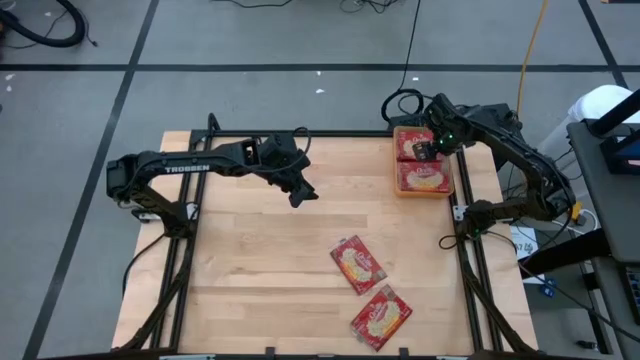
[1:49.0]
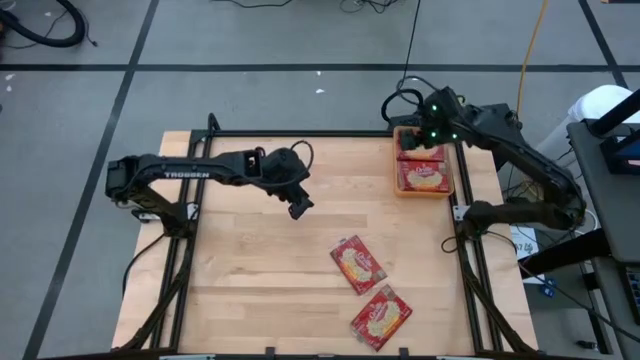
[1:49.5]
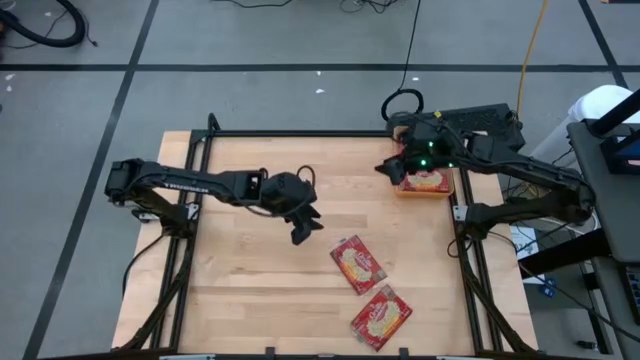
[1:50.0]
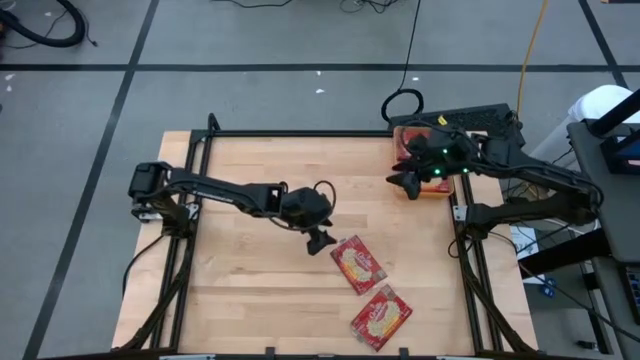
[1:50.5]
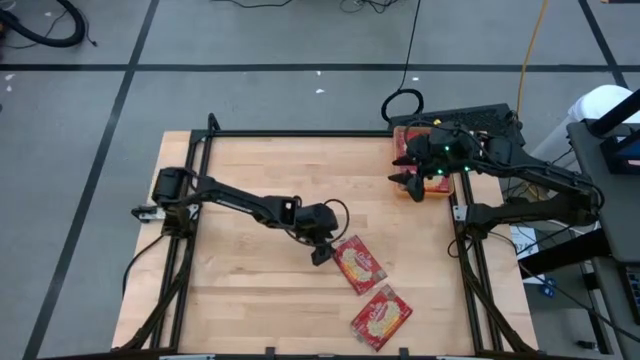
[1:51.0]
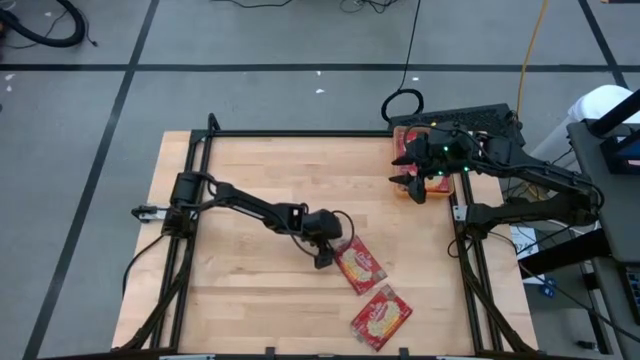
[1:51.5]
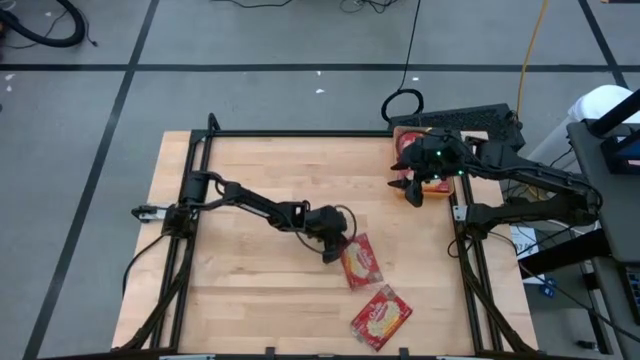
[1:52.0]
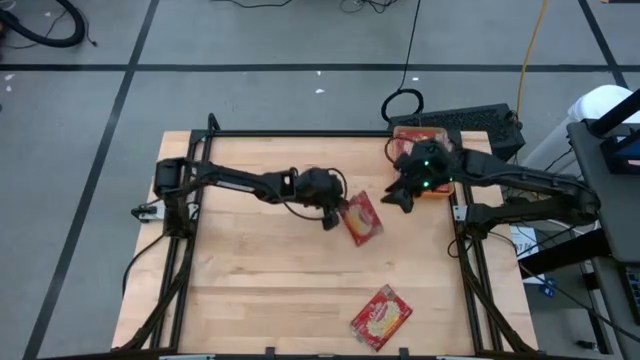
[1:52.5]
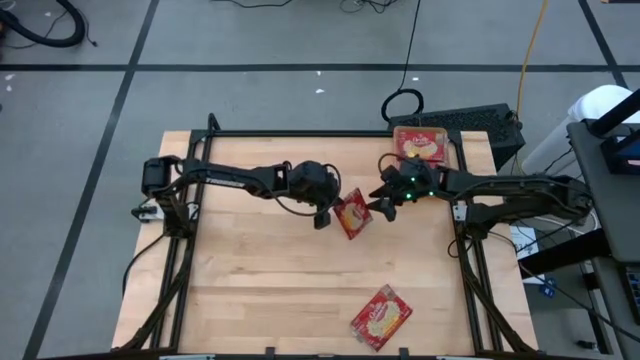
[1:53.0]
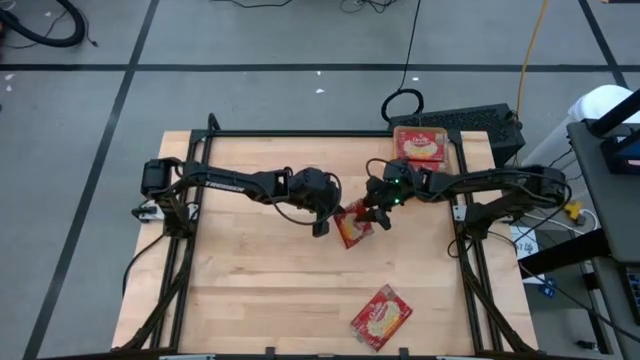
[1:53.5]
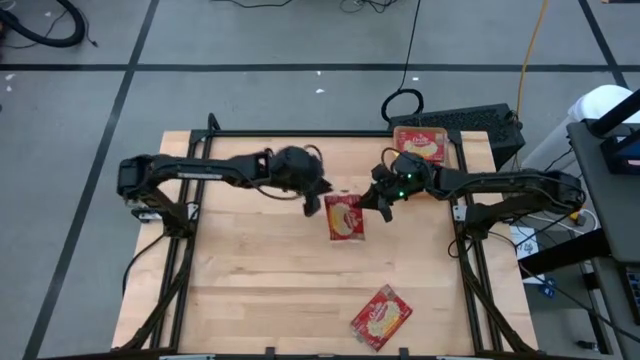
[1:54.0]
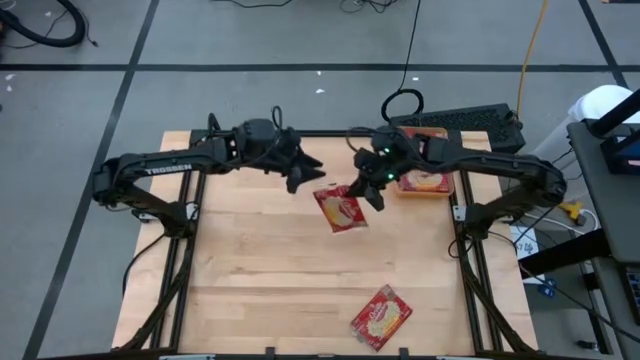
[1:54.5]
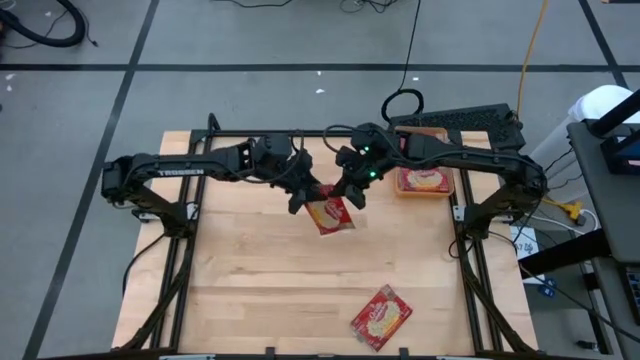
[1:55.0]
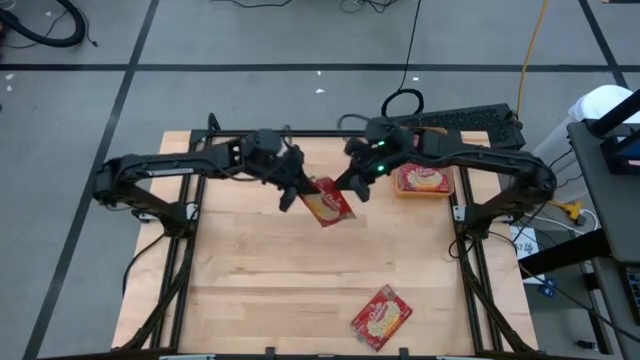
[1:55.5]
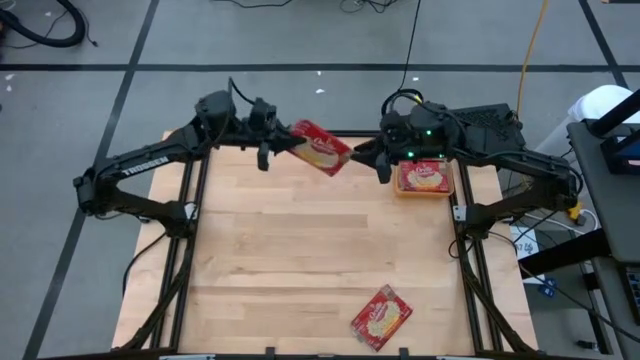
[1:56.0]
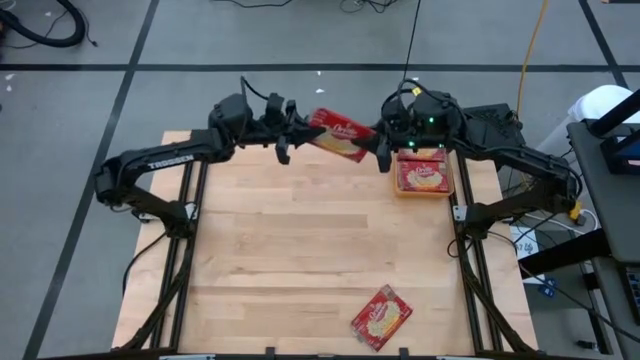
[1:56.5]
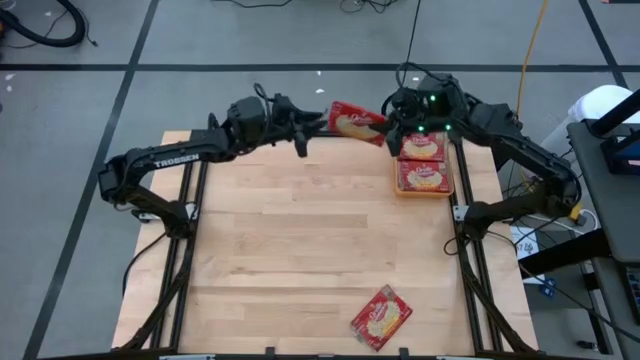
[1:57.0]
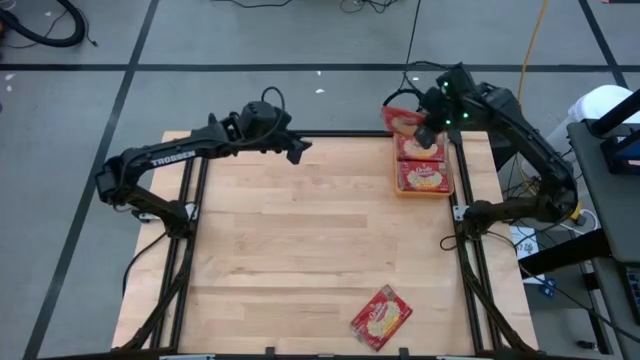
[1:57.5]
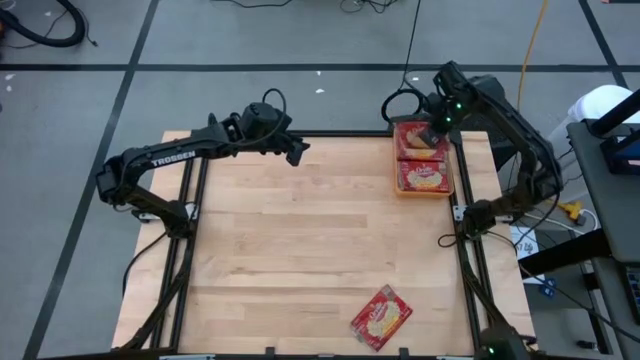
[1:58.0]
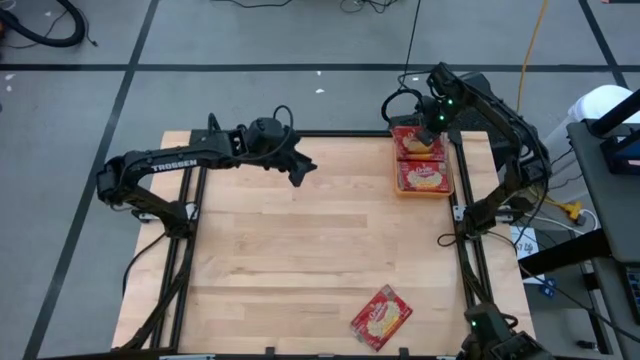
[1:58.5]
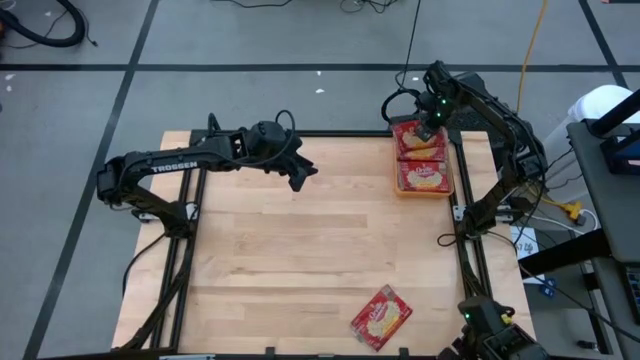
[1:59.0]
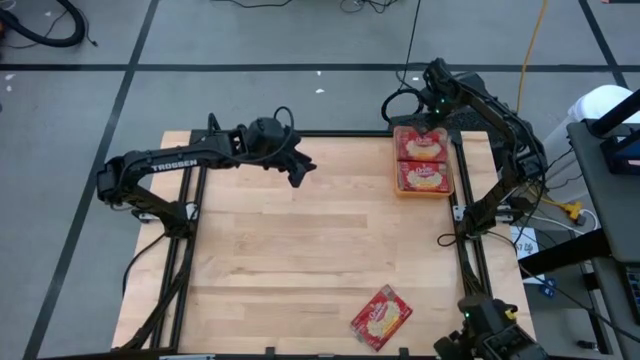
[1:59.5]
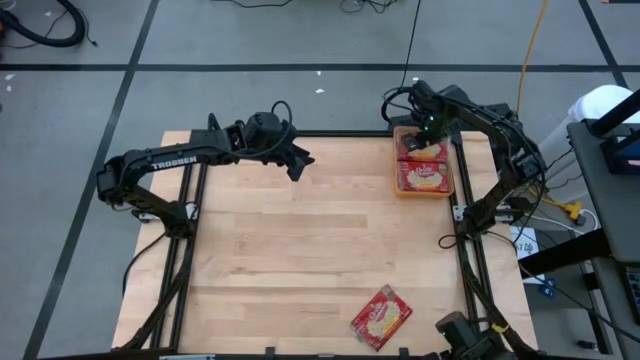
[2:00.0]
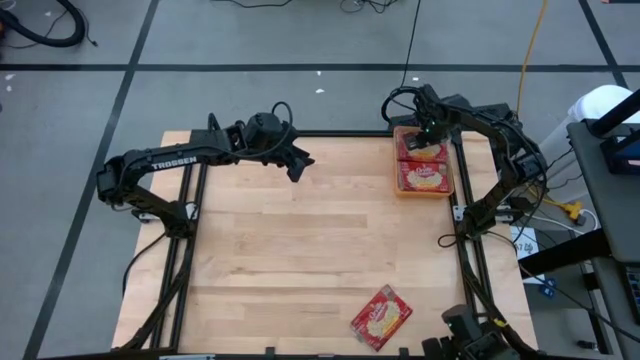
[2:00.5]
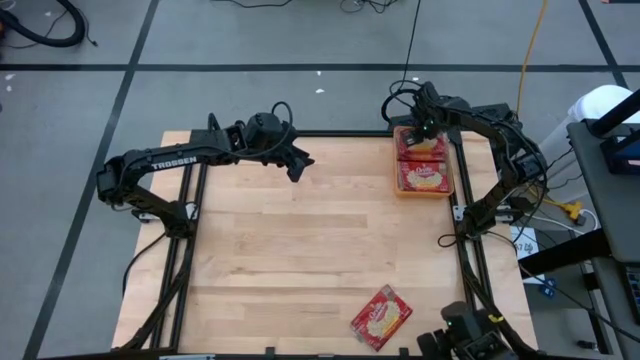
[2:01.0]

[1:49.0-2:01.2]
Task: Sort popcorn bags into baskets
Put the red popcorn bag into the orange bin
